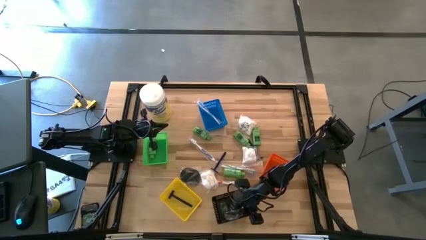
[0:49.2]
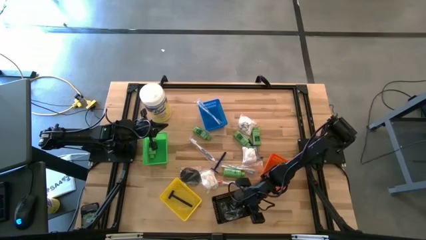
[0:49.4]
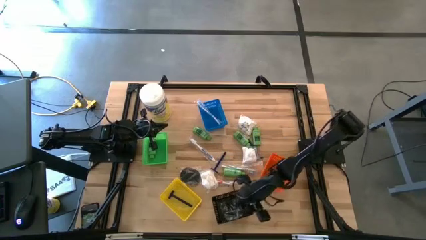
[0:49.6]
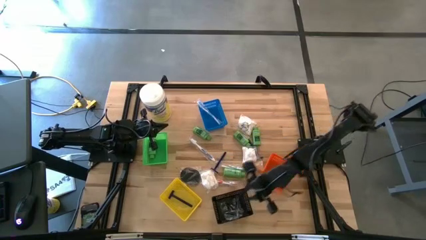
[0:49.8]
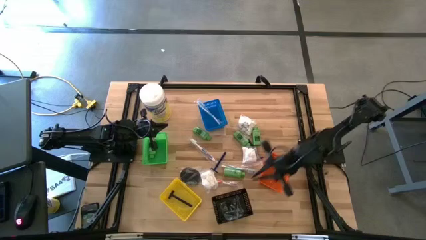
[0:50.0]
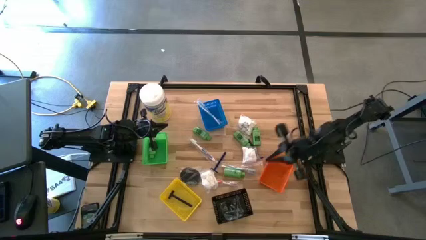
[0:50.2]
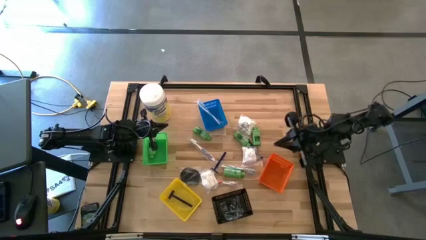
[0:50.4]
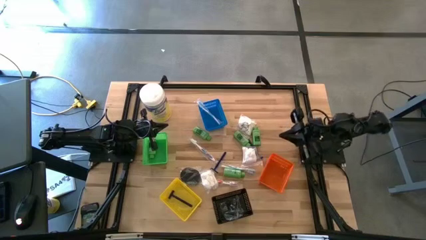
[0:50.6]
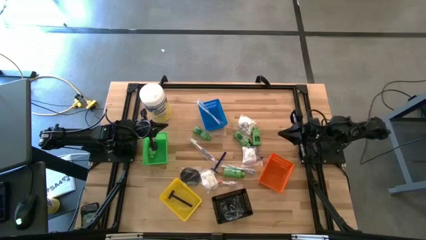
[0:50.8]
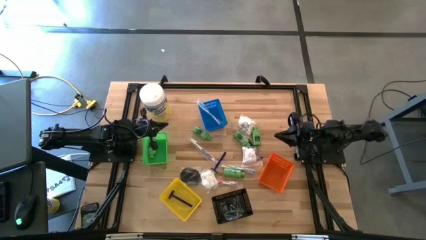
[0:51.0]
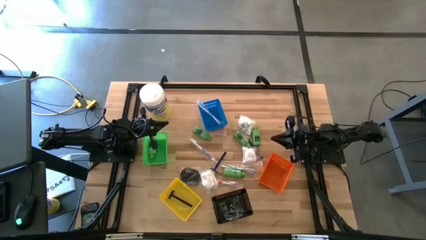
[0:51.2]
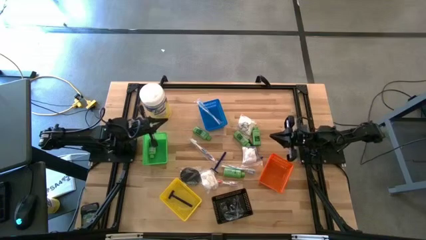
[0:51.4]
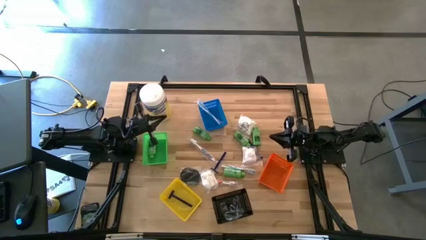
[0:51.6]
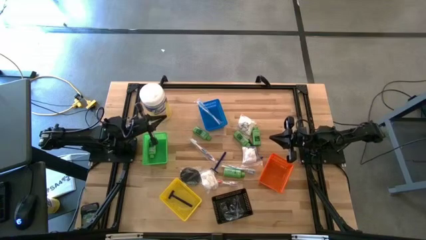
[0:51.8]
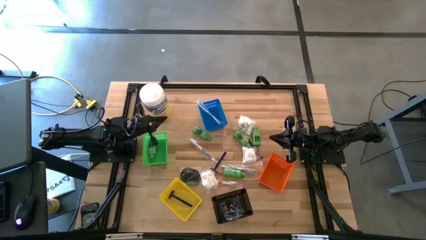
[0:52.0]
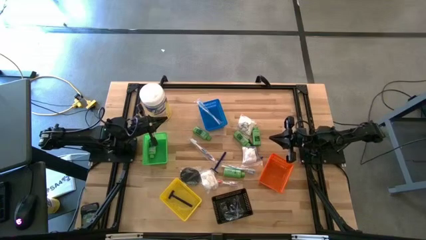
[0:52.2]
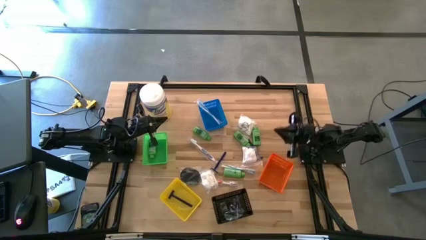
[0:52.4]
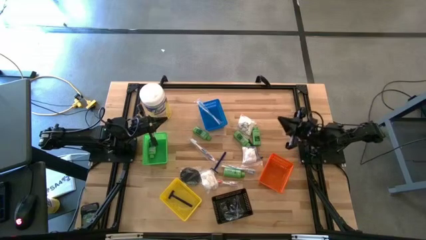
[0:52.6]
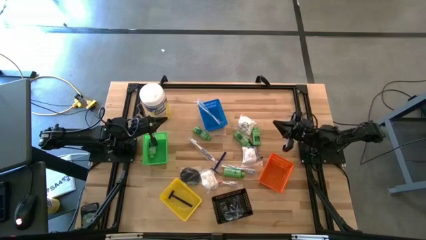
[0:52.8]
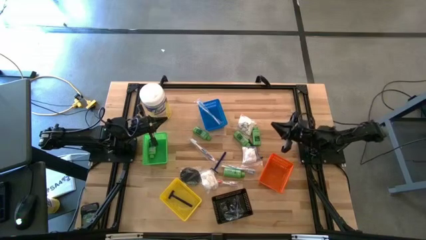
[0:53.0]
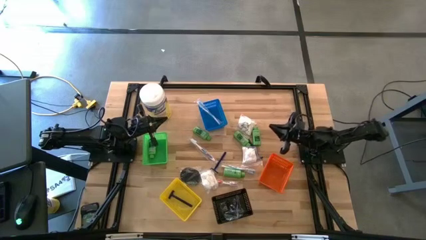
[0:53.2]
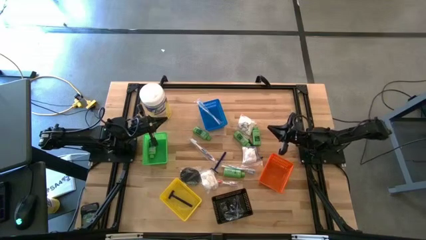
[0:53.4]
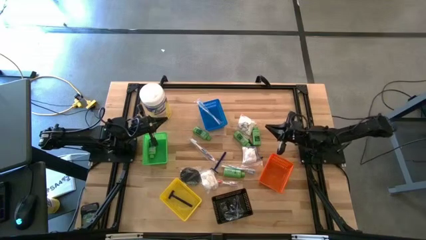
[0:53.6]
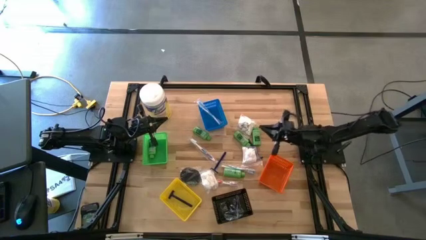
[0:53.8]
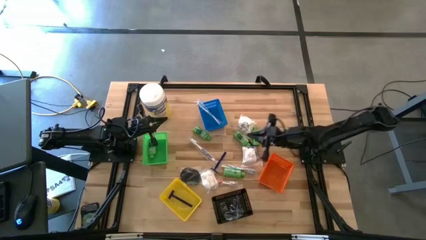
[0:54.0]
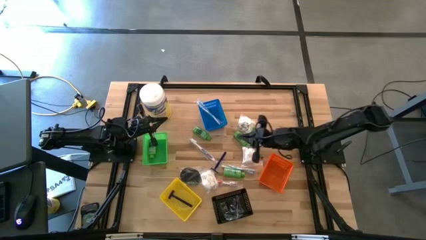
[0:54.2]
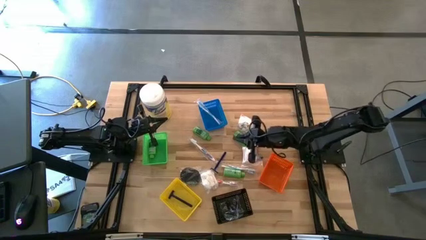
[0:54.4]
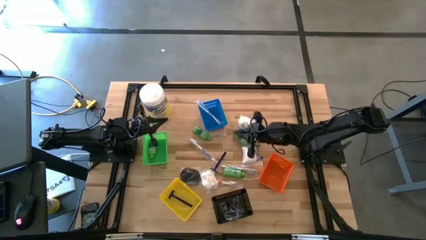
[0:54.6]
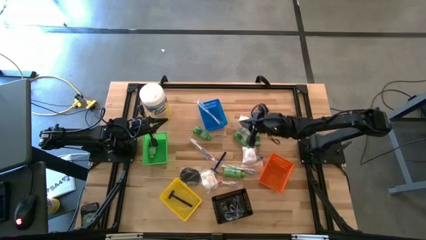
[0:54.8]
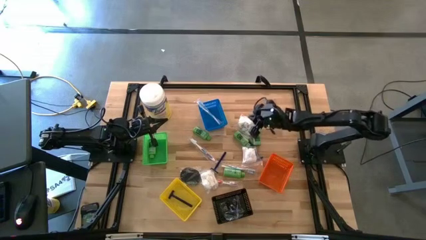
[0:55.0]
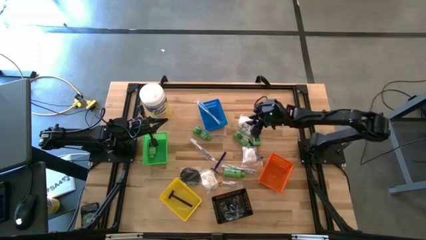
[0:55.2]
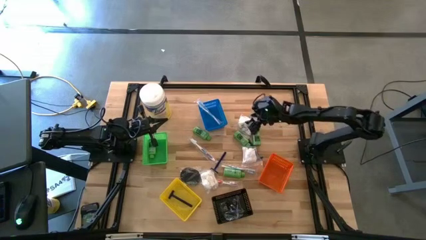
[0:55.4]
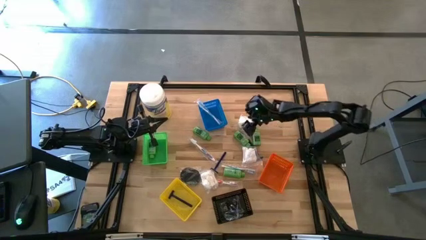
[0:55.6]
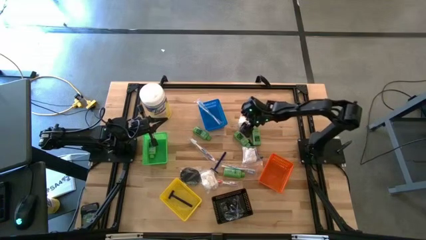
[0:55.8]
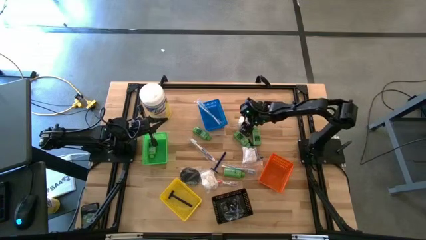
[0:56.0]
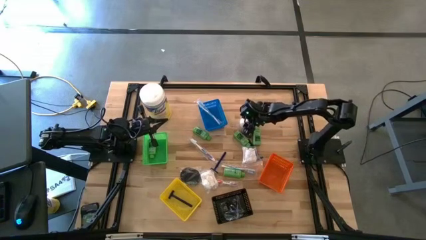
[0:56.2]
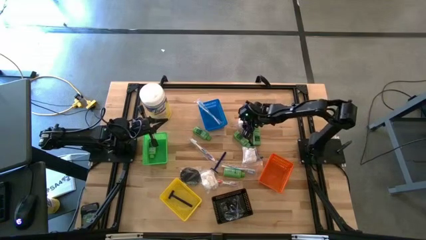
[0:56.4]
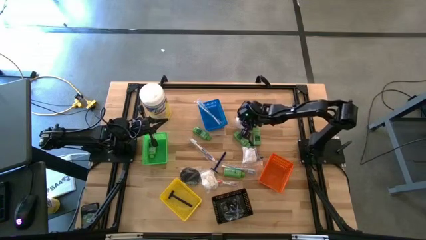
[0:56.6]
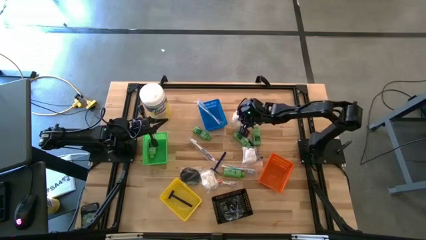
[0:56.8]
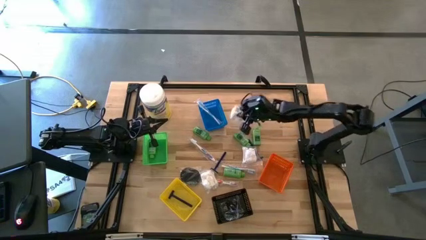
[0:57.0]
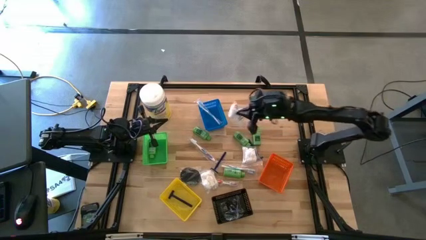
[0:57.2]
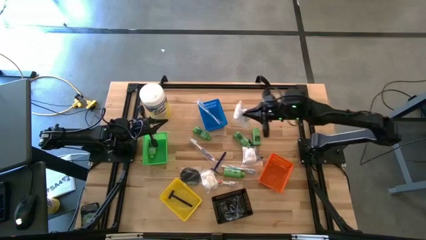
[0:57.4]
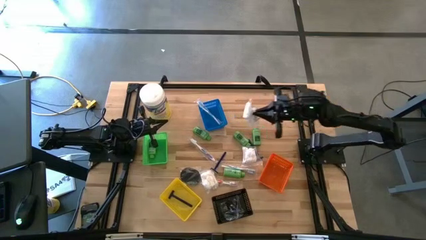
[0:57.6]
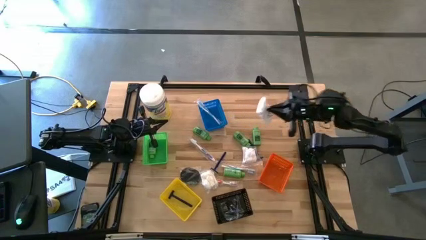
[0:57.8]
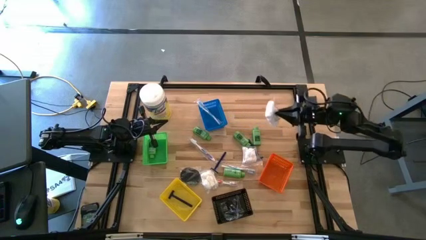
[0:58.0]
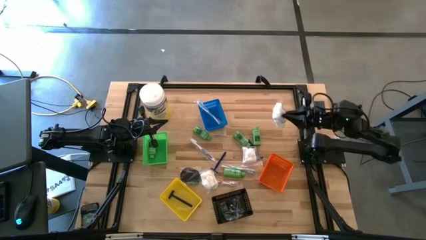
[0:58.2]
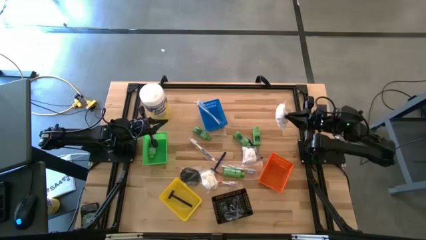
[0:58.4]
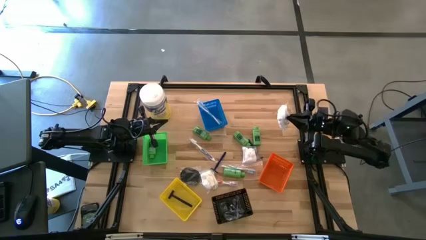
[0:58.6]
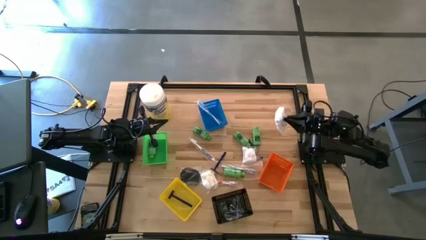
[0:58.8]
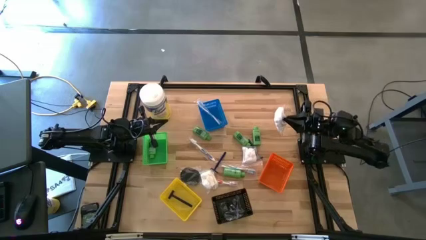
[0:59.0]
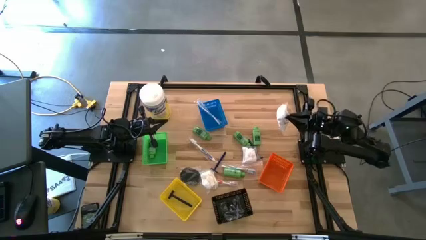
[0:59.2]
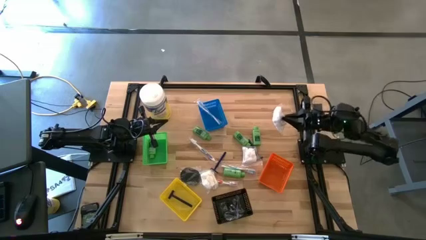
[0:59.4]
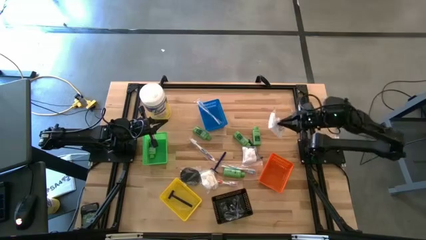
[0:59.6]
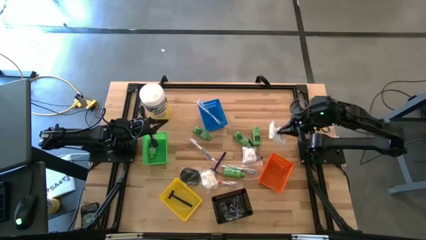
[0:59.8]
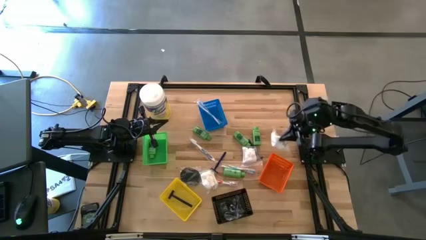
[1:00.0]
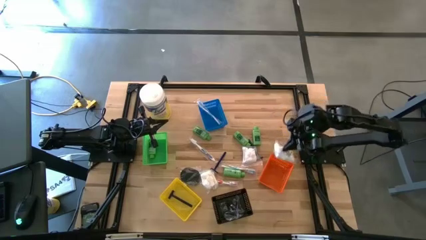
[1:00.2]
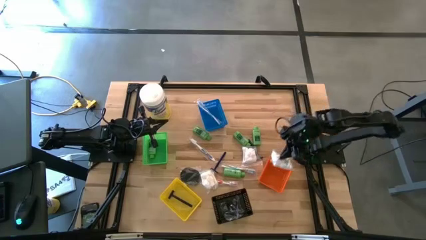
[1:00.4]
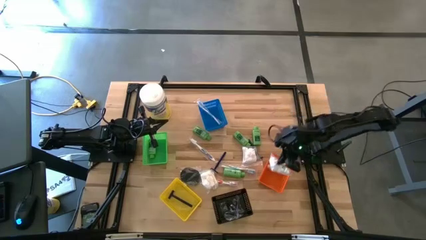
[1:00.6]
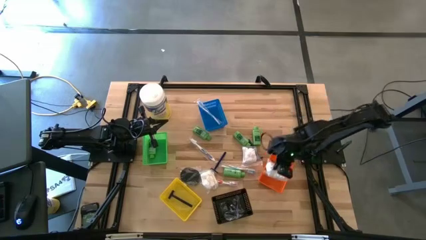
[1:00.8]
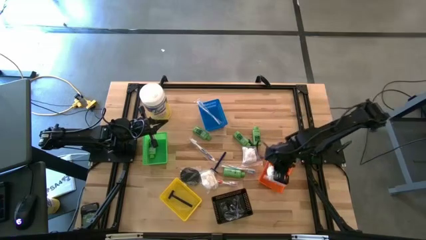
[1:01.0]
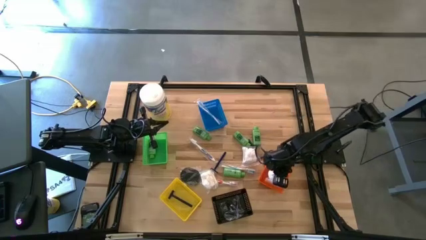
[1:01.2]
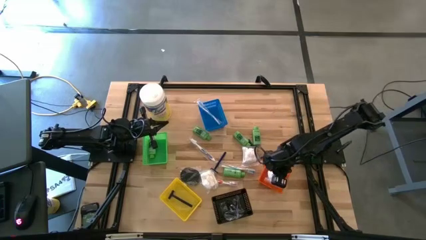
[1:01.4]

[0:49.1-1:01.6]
Task: Pick & Place Travel size toiletries
Put the white cotton pack into the orange bin

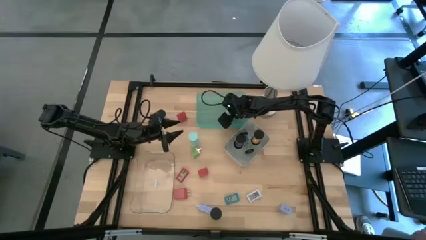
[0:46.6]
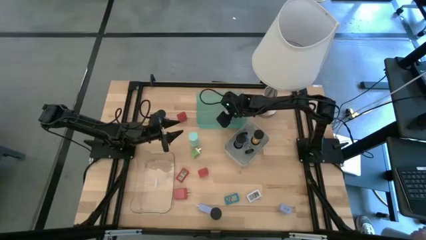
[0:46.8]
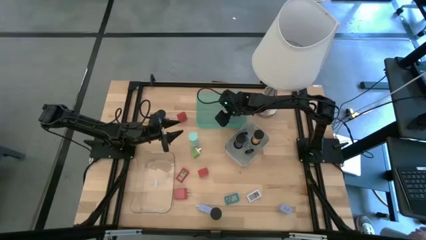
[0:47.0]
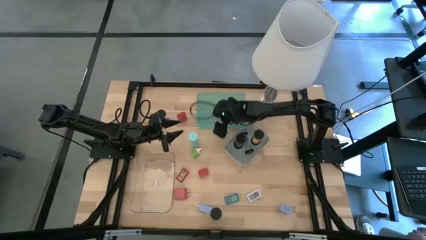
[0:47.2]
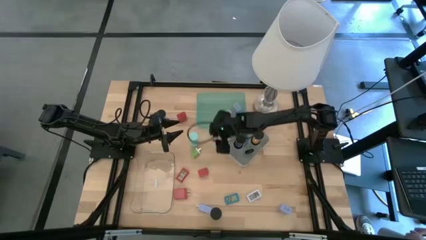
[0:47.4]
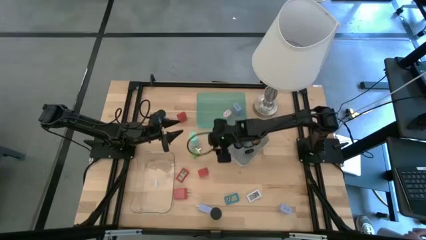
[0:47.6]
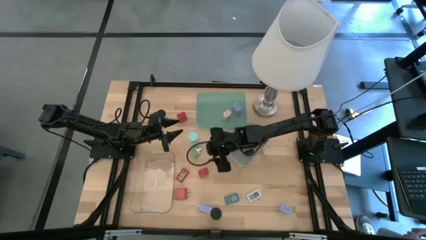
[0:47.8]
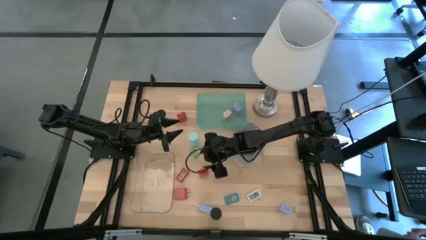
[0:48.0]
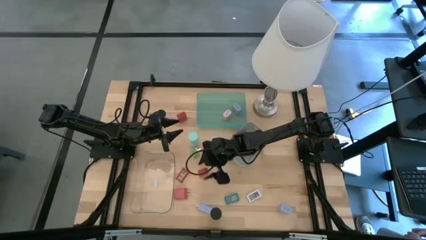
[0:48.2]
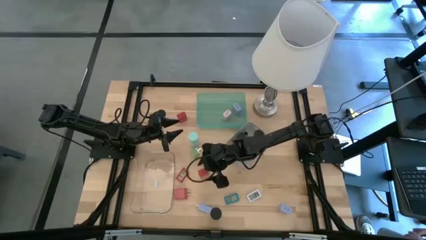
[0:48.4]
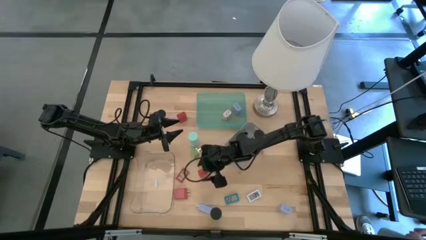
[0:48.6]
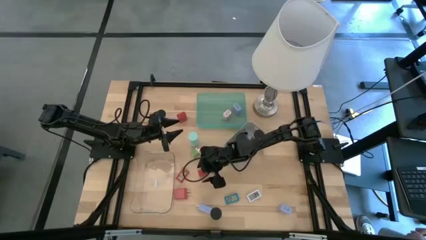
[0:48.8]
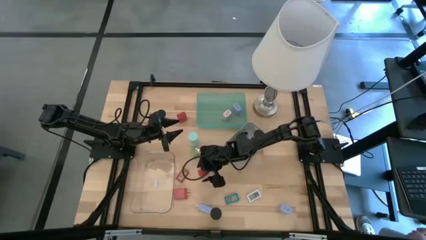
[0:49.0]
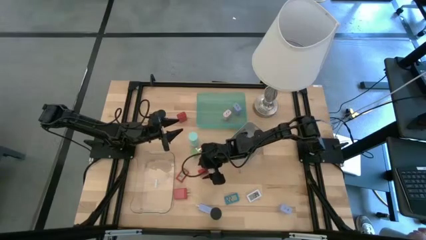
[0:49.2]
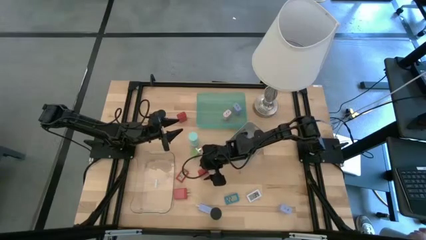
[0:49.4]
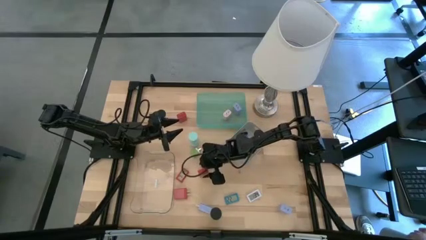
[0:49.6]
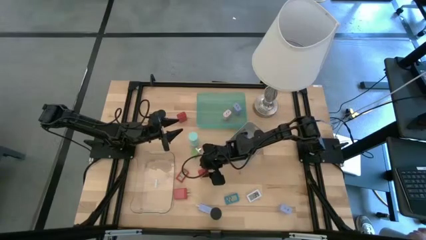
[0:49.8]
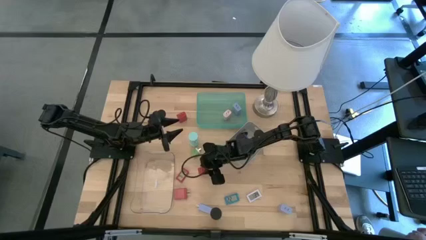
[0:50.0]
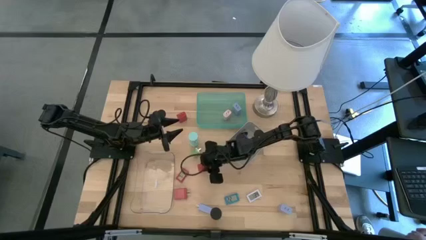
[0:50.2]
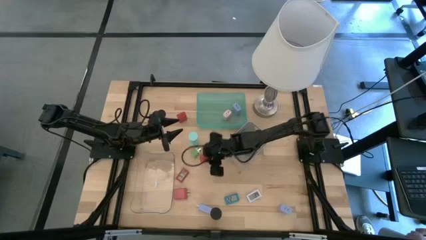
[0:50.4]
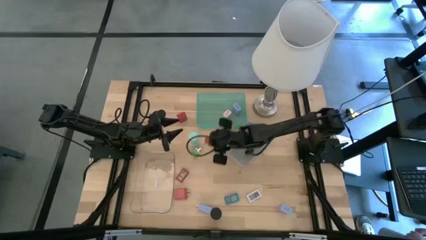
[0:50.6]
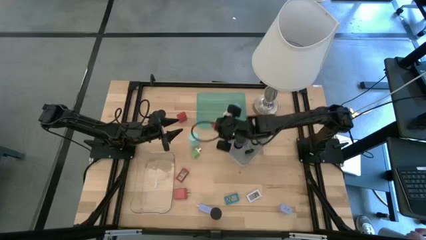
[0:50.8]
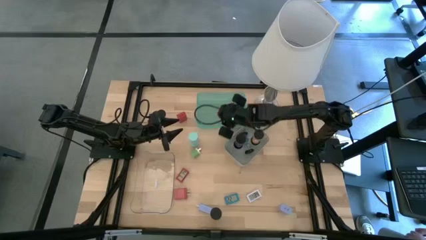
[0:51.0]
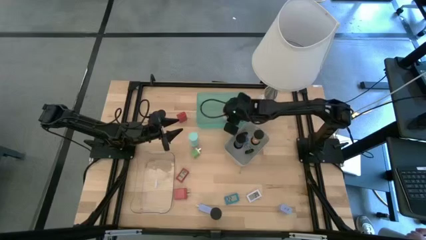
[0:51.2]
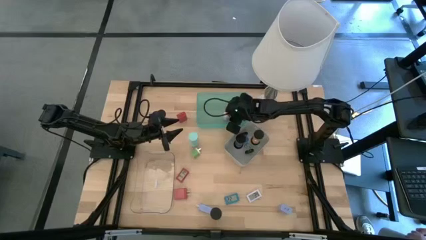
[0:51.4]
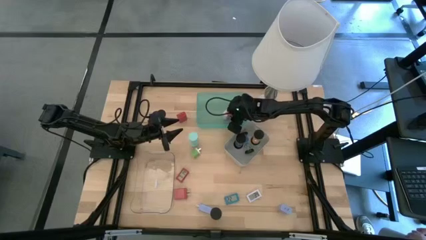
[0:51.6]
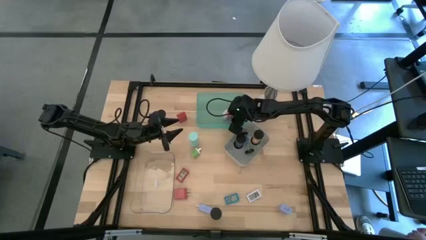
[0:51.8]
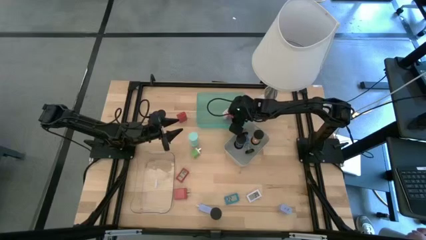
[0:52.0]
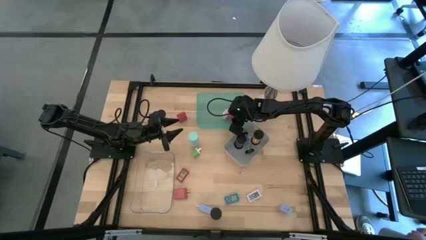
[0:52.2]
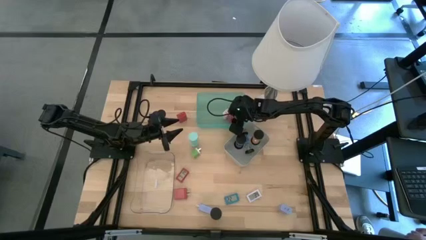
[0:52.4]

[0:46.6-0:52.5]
Task: Pick & Place Office items
Put the middle red charger adapter into the green bin
